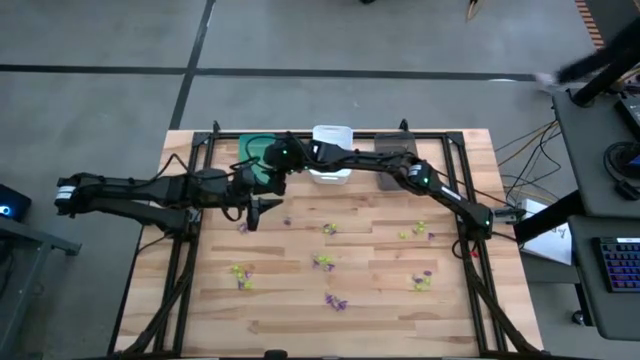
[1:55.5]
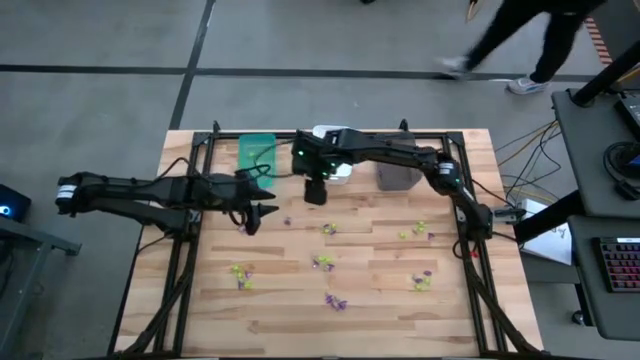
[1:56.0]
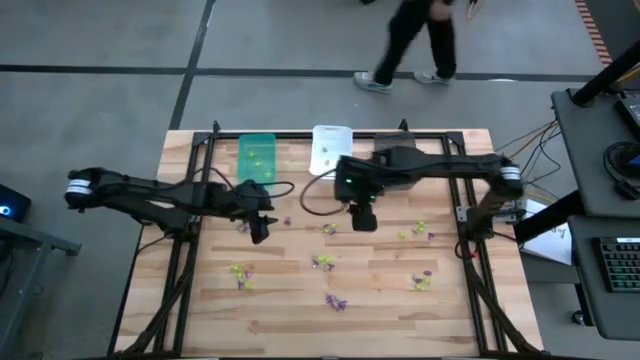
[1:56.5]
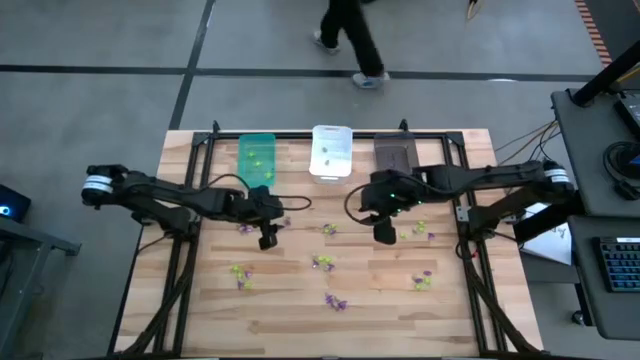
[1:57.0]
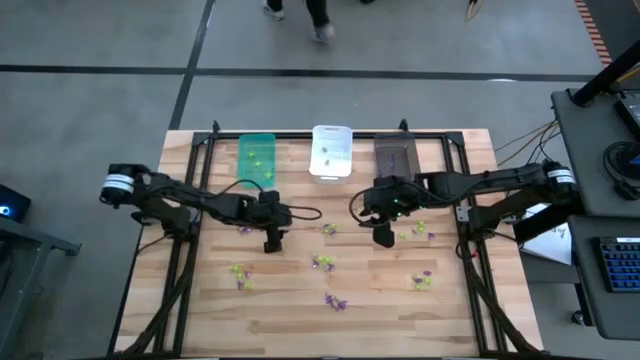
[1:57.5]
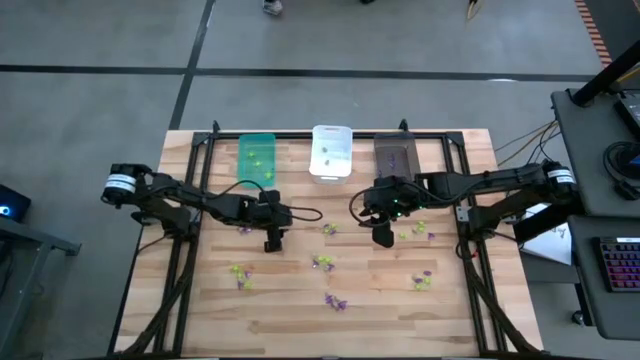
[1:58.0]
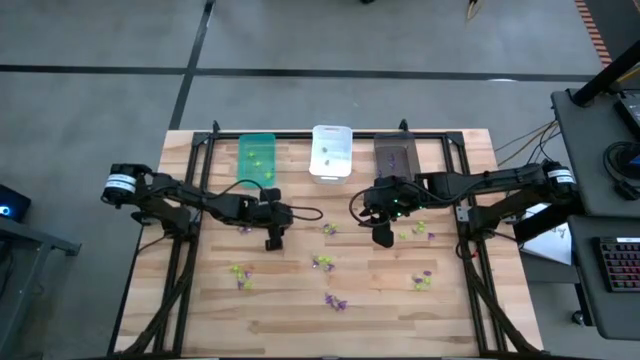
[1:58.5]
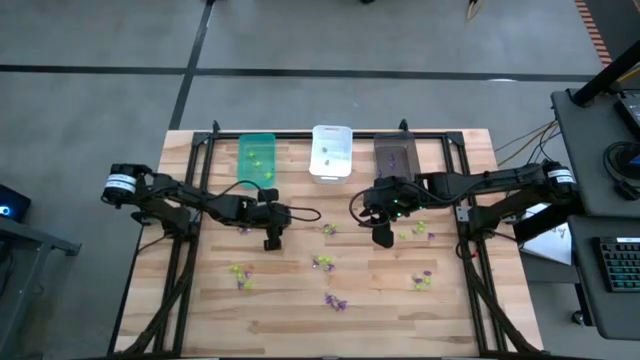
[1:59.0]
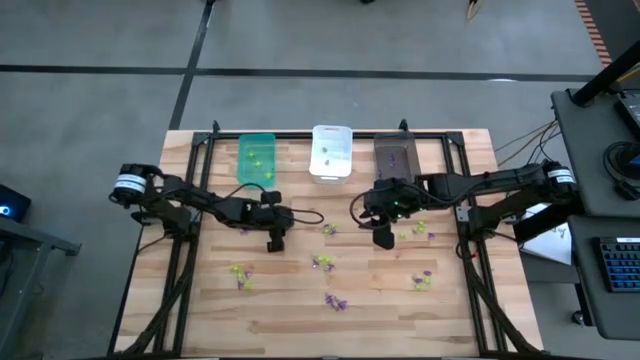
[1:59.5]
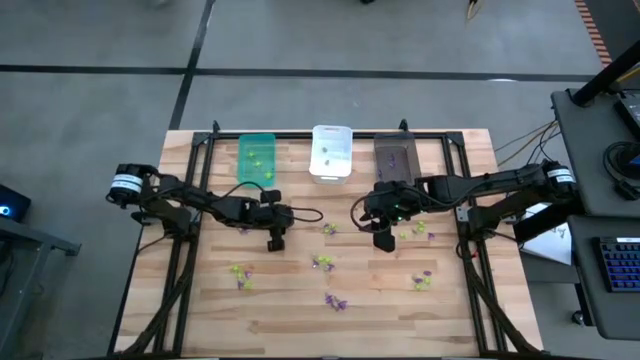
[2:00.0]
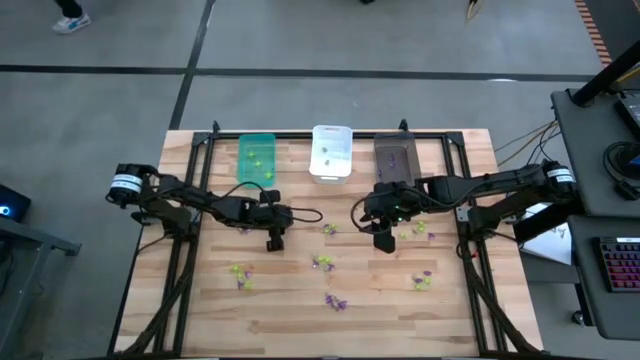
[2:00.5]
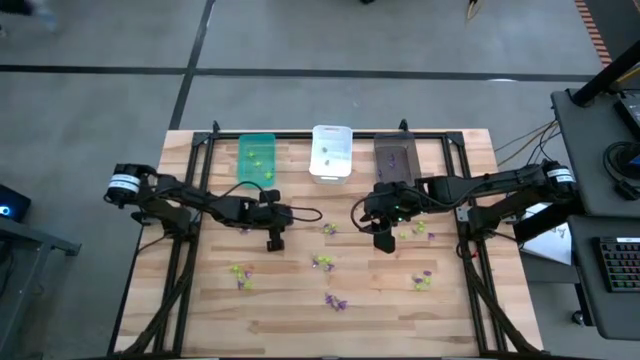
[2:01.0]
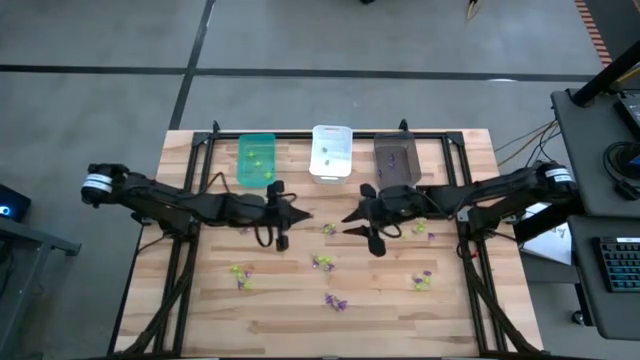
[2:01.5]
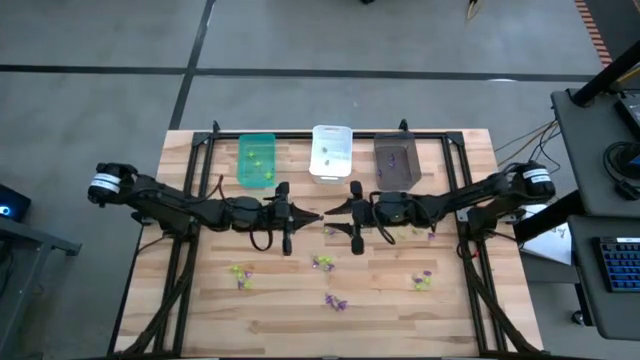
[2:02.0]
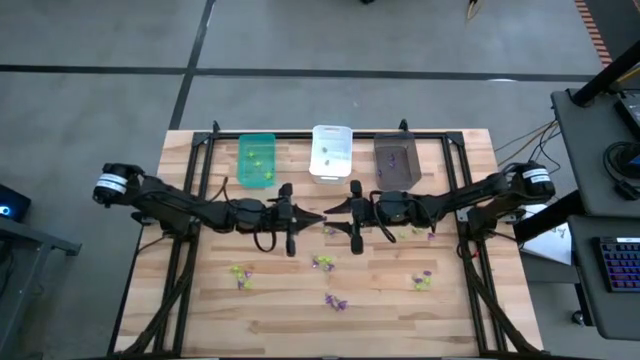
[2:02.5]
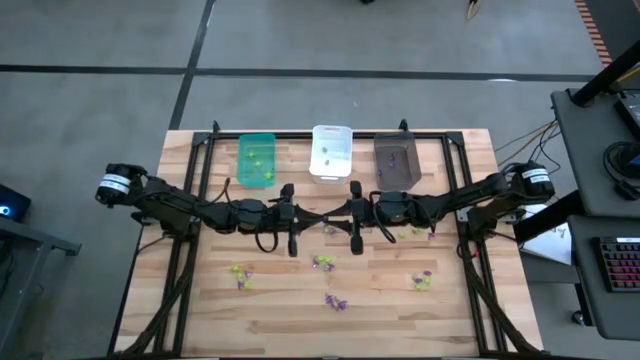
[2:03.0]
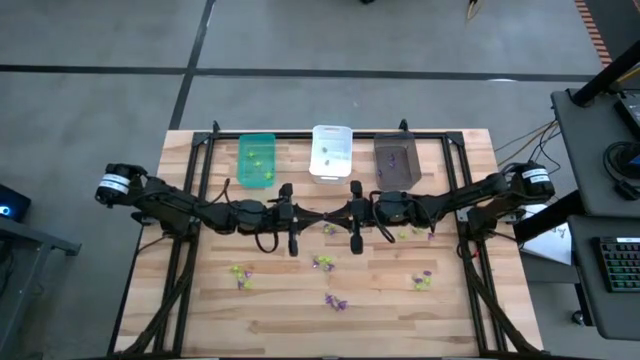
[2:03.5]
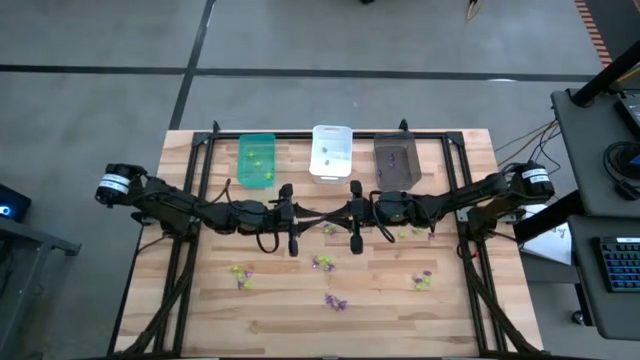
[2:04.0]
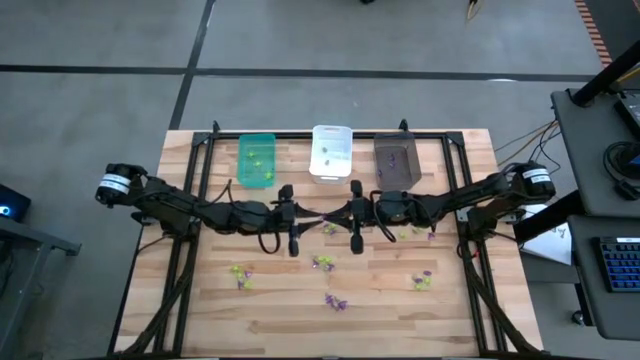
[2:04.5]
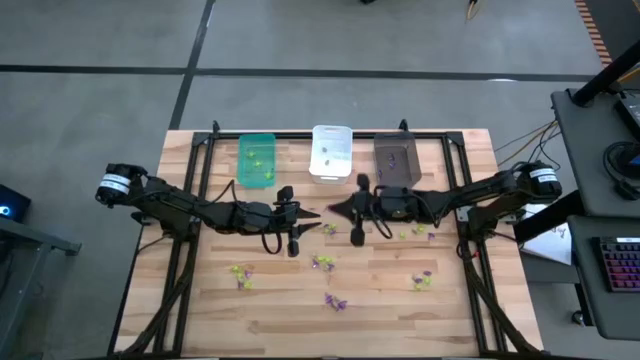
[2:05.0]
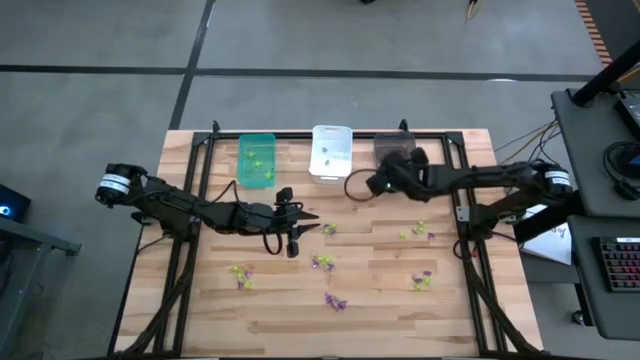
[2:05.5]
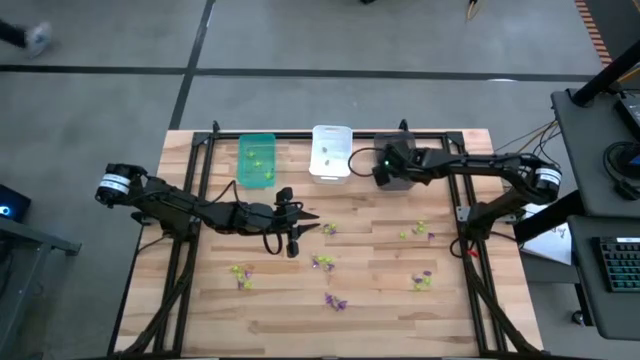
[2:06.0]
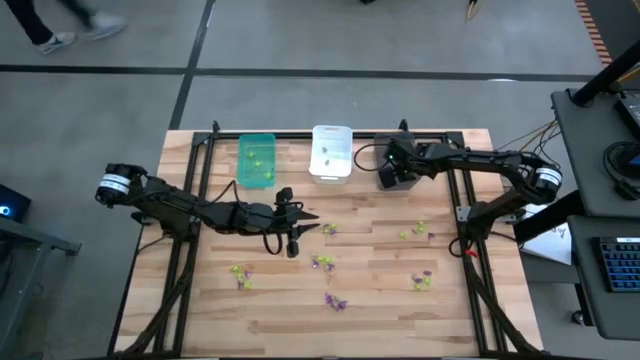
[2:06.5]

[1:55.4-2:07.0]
Task: Sort Halloween decoration
Put the purple witch hat toy into the gray bin

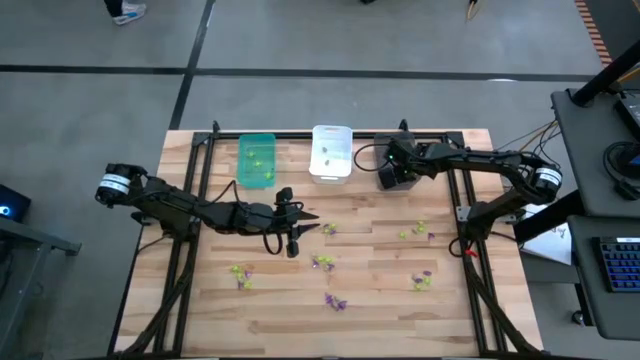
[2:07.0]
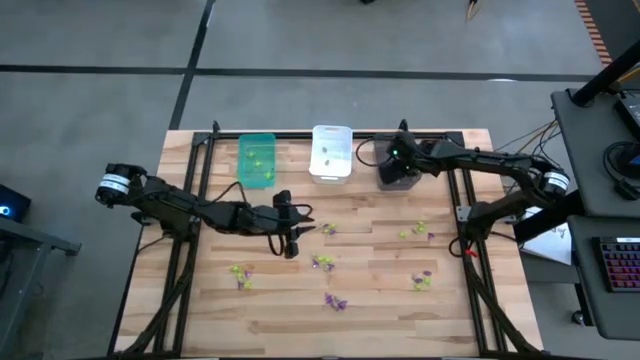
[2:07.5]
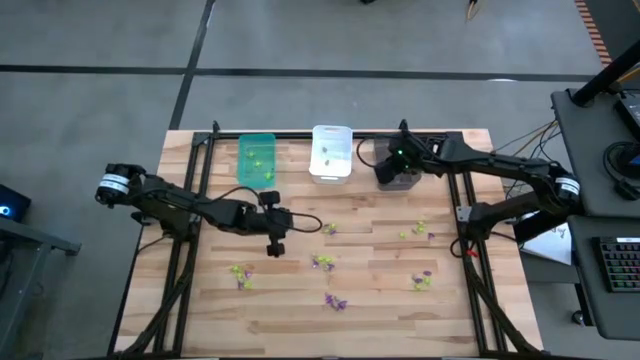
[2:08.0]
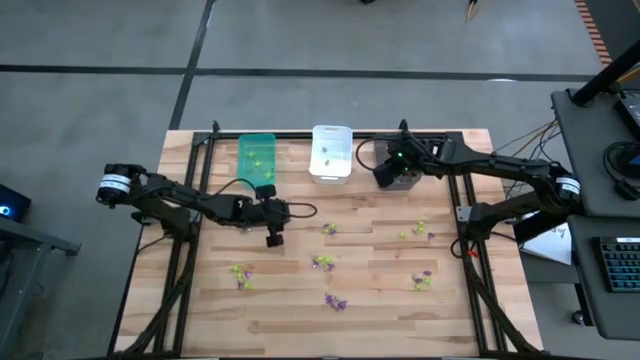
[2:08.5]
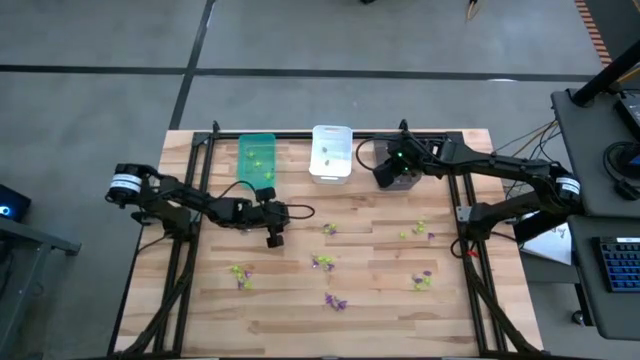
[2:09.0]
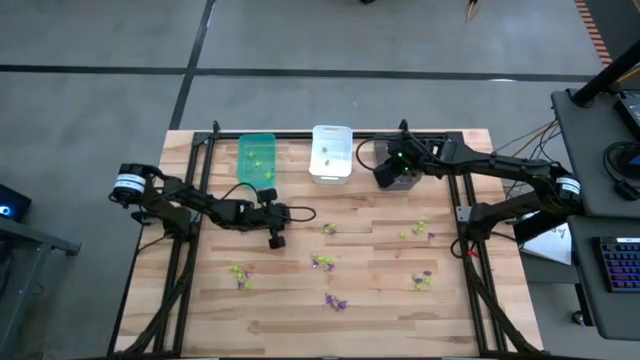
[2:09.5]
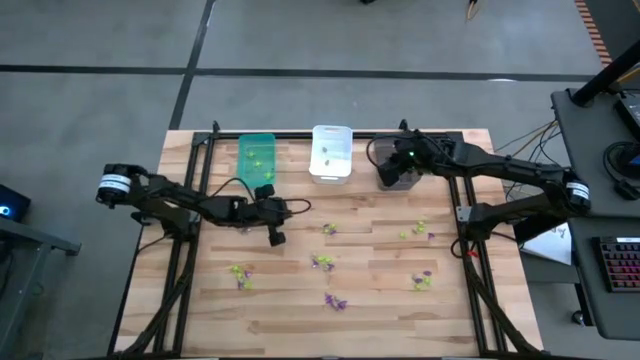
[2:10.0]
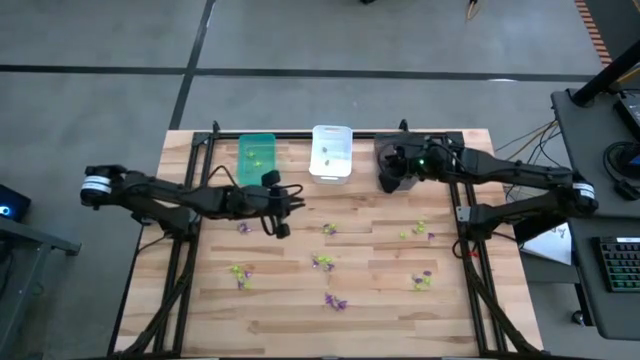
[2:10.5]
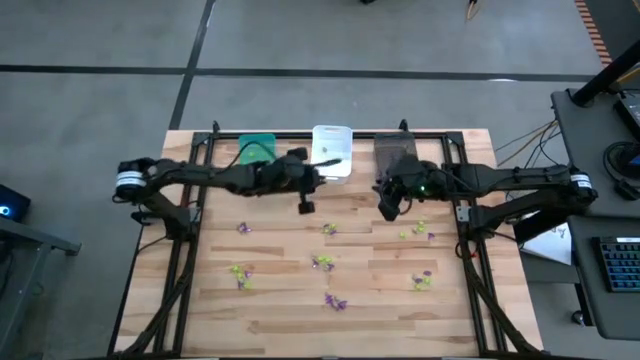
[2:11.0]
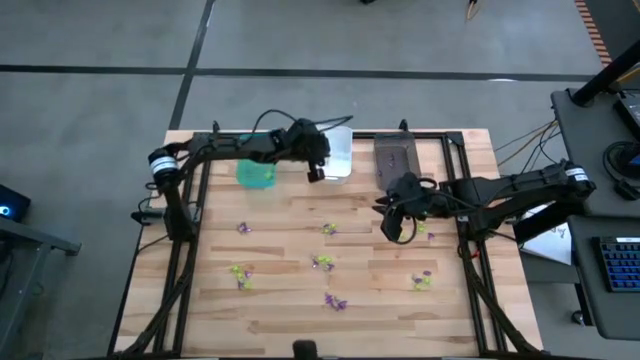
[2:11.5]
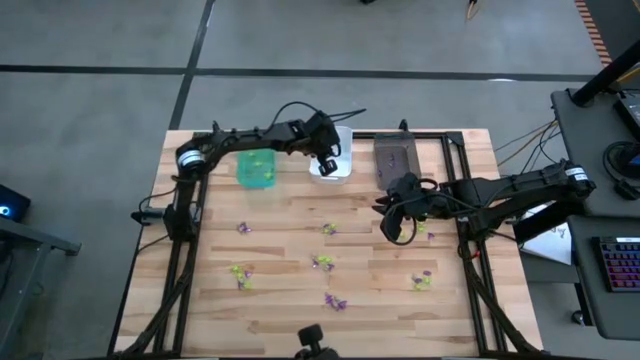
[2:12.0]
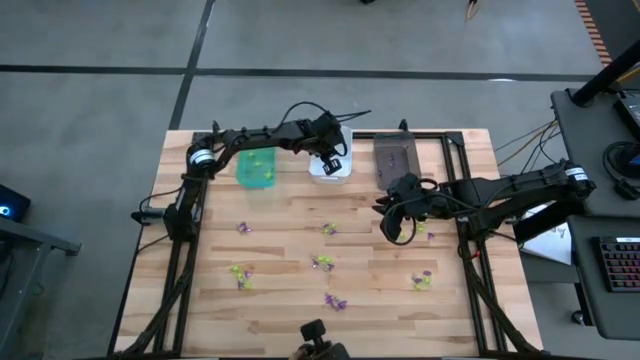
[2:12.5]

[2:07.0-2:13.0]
Put the white skull toy into the white bin

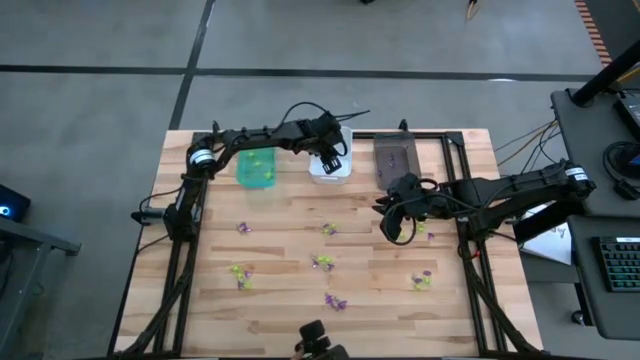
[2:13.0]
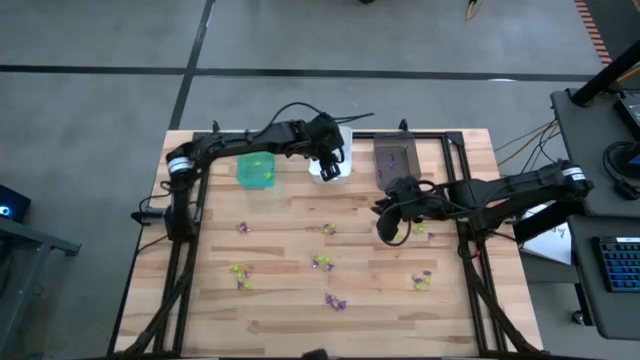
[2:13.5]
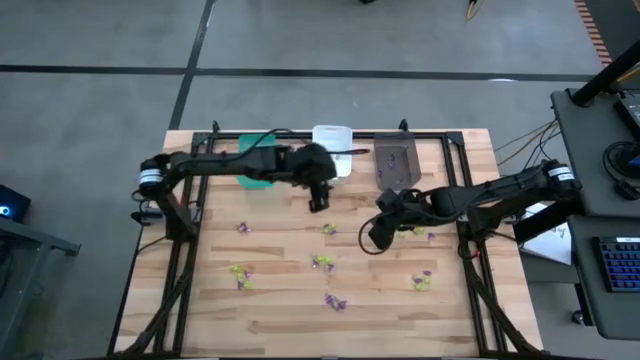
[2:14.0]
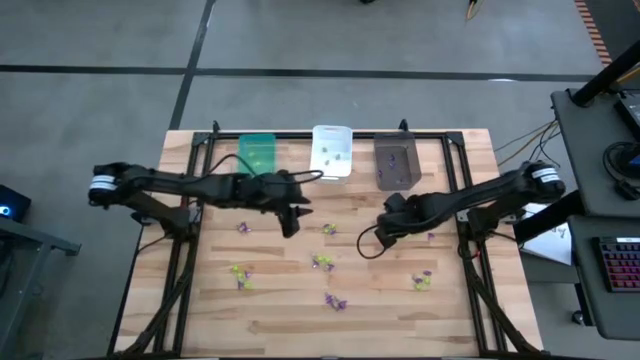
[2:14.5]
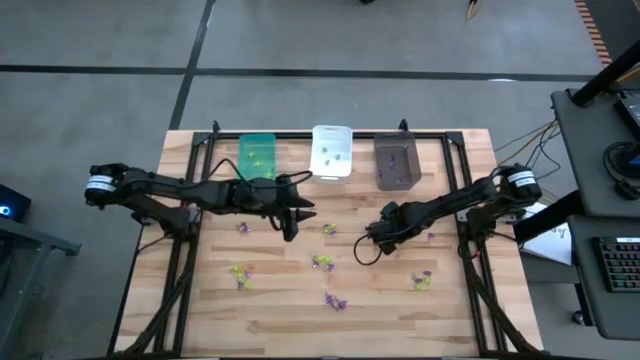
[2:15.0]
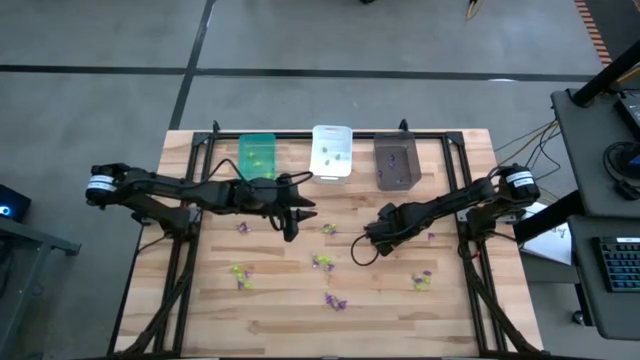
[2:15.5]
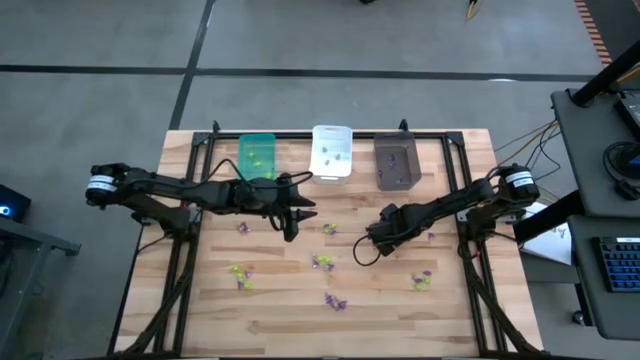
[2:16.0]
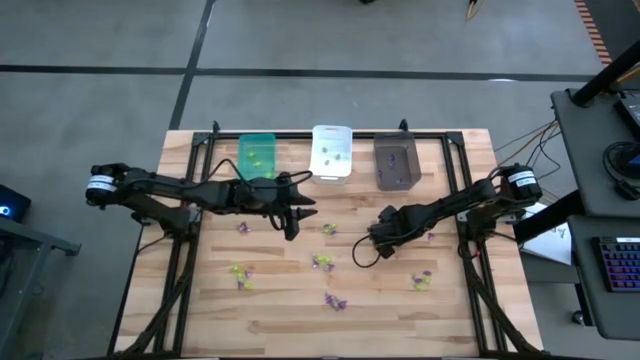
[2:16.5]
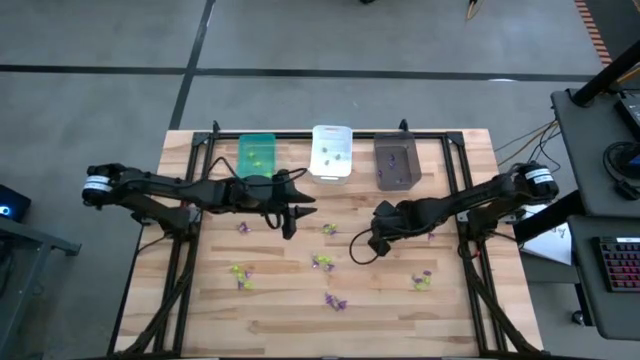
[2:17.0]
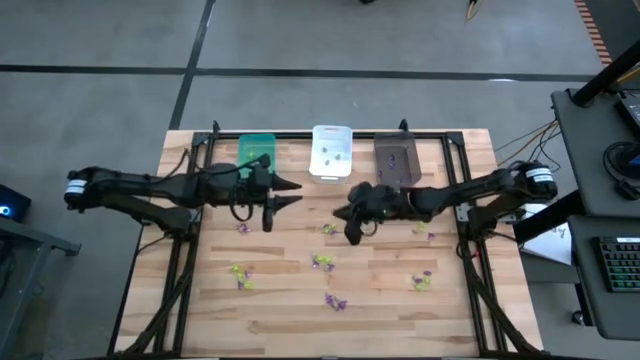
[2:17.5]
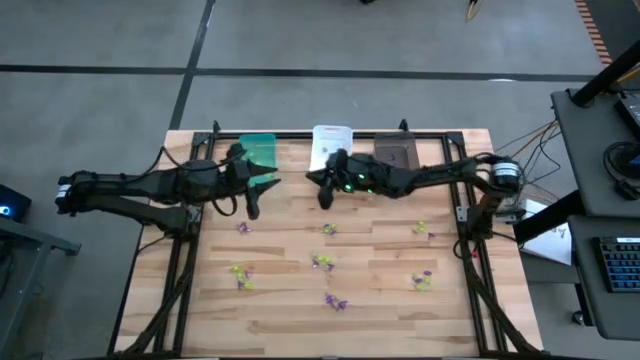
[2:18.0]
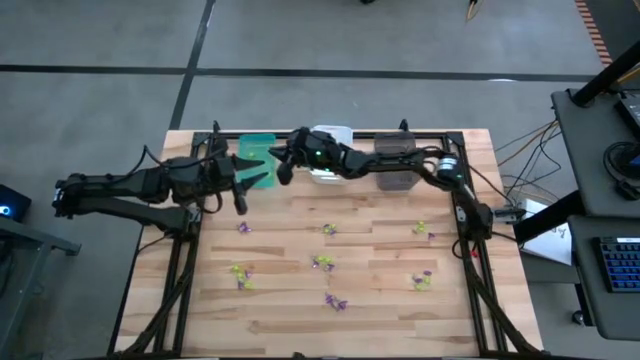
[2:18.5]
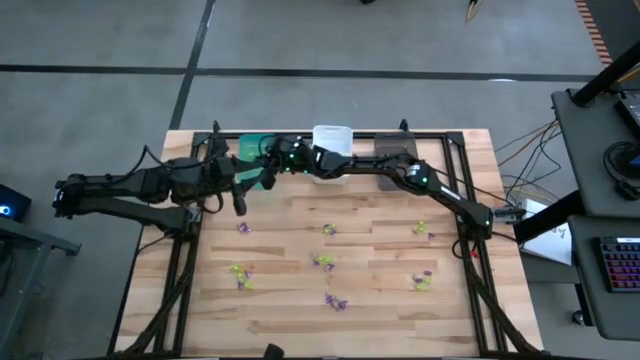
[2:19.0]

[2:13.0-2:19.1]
Put the green spider toy into the blue bin
